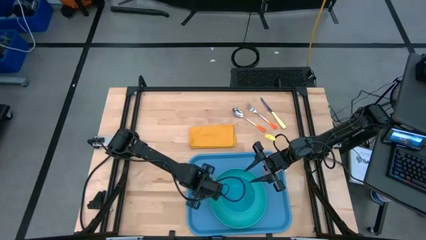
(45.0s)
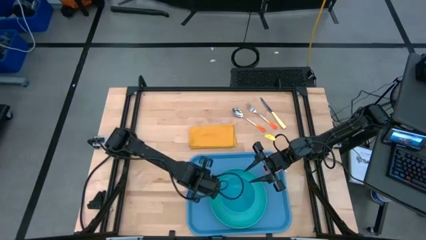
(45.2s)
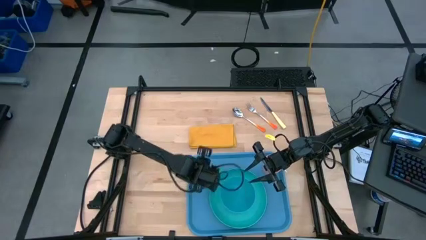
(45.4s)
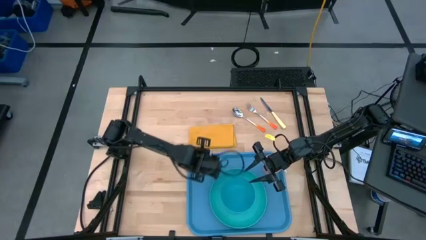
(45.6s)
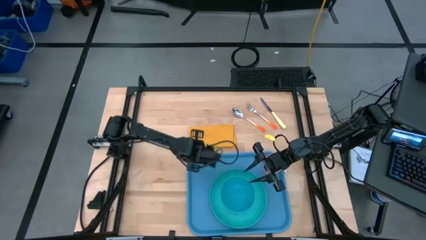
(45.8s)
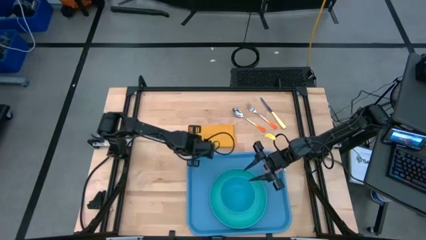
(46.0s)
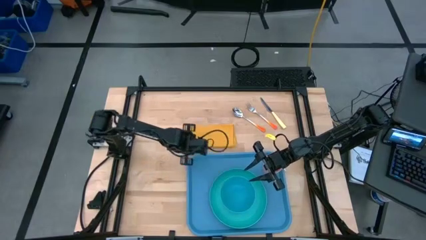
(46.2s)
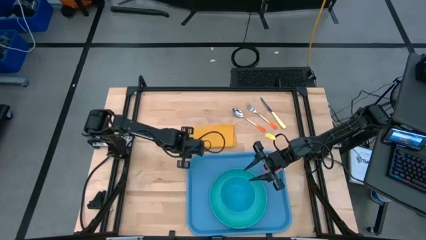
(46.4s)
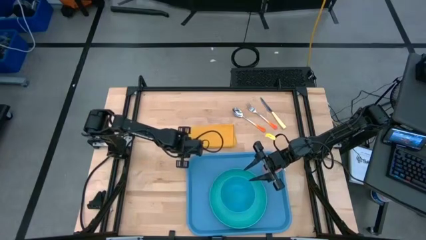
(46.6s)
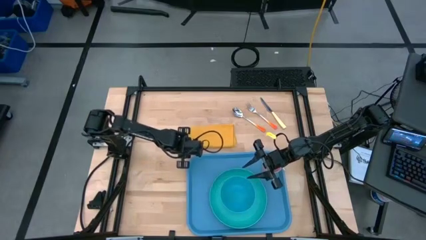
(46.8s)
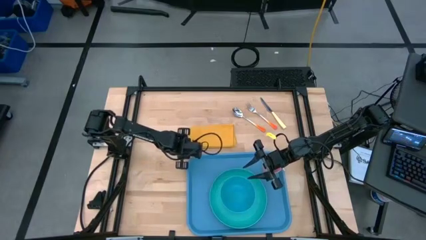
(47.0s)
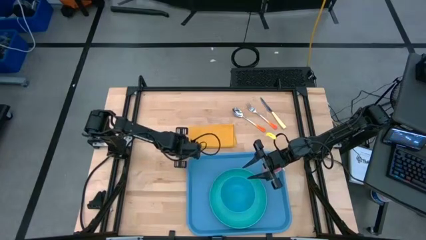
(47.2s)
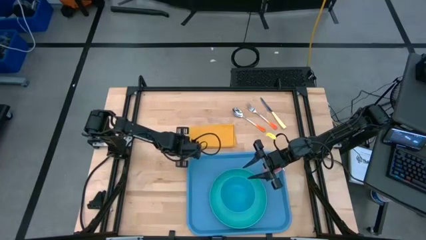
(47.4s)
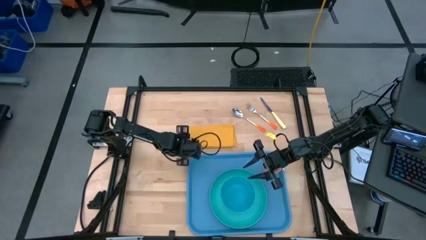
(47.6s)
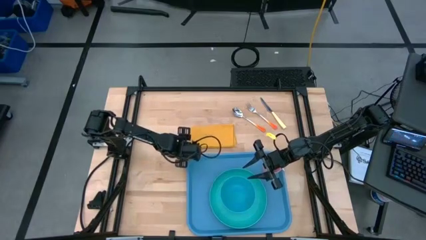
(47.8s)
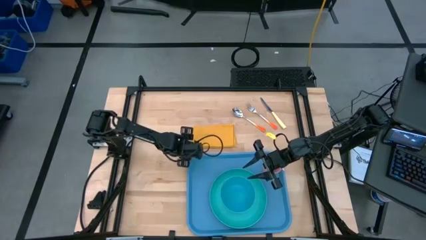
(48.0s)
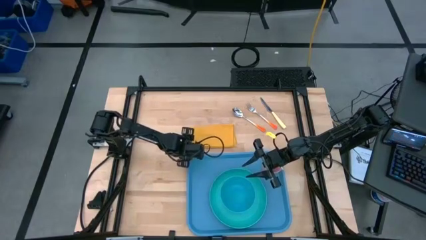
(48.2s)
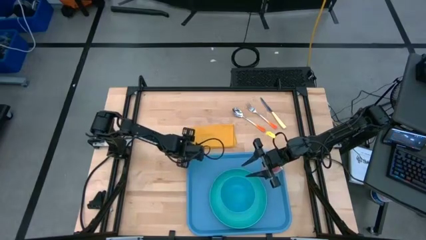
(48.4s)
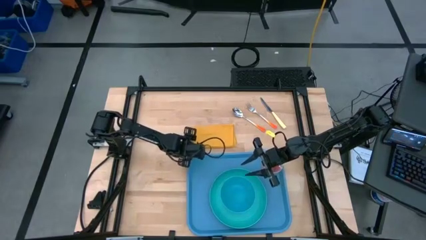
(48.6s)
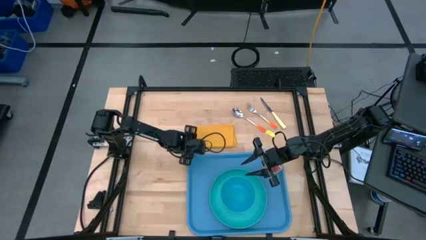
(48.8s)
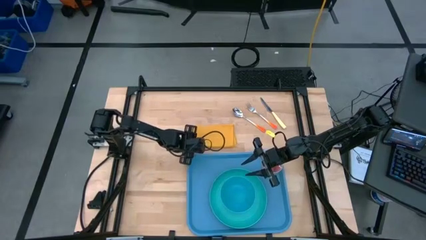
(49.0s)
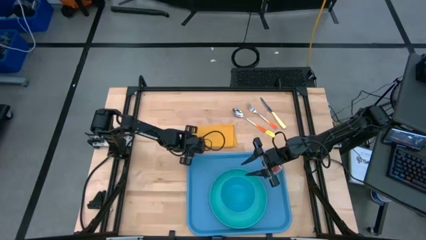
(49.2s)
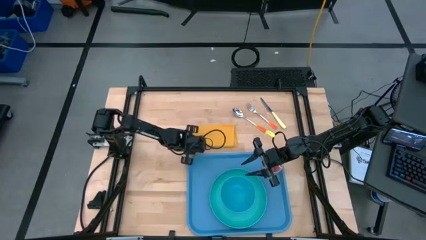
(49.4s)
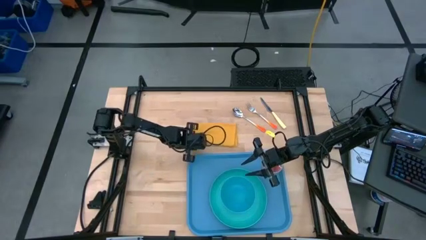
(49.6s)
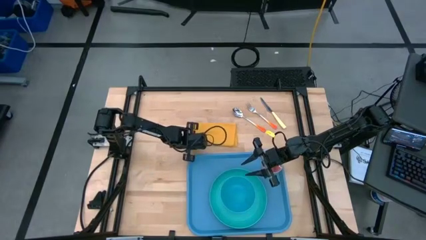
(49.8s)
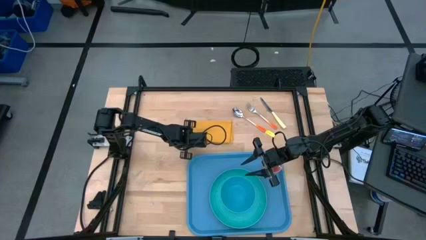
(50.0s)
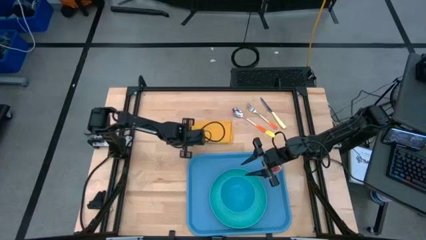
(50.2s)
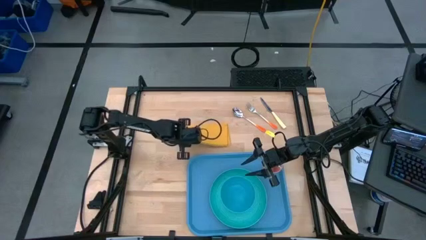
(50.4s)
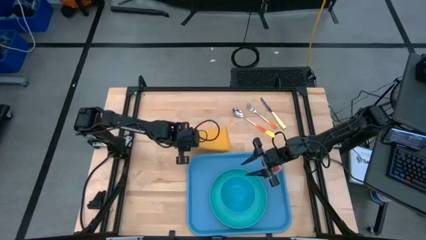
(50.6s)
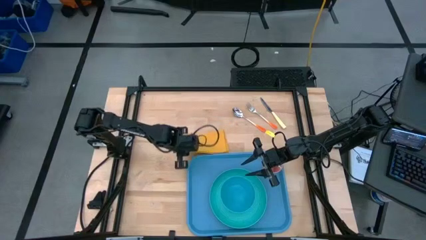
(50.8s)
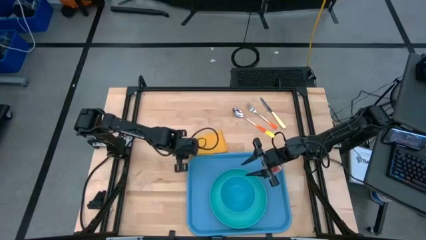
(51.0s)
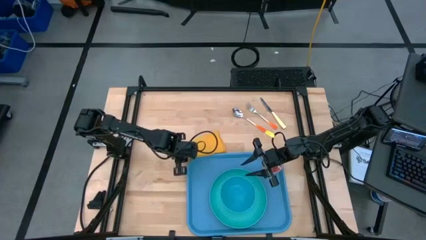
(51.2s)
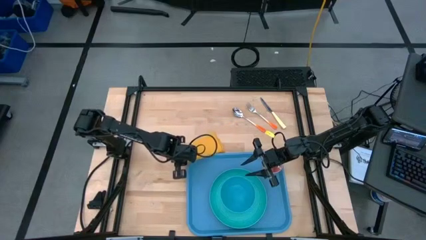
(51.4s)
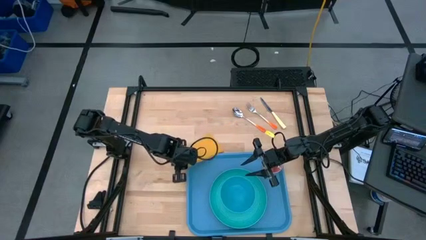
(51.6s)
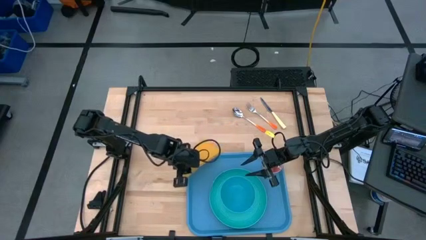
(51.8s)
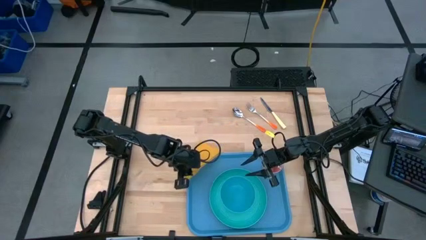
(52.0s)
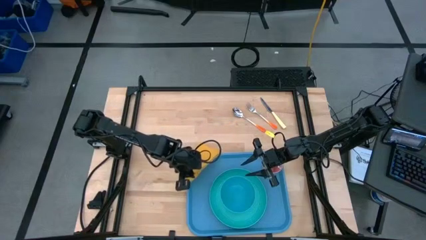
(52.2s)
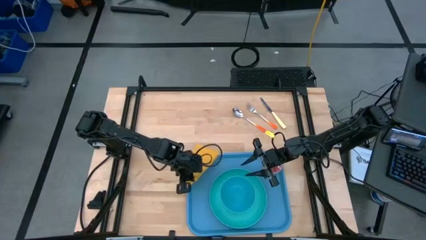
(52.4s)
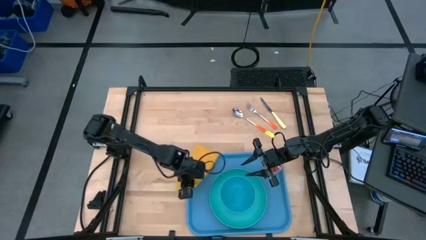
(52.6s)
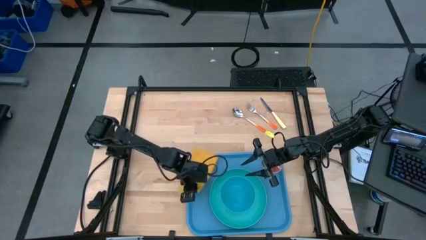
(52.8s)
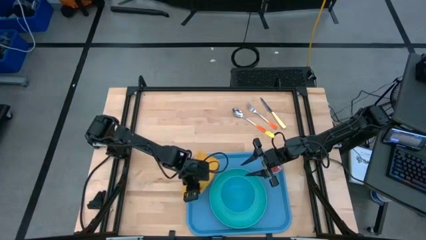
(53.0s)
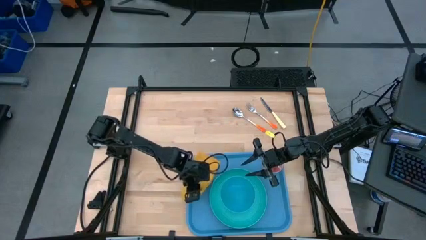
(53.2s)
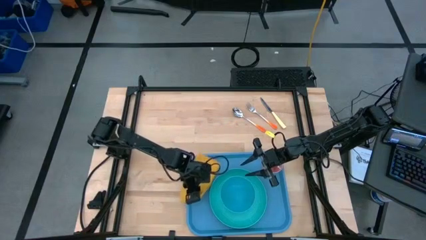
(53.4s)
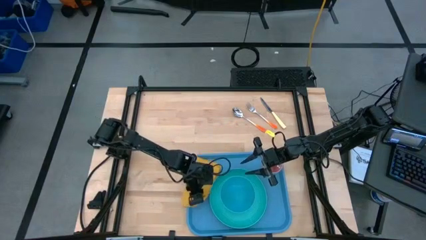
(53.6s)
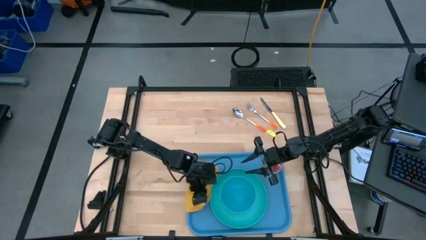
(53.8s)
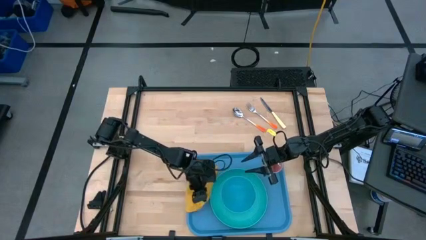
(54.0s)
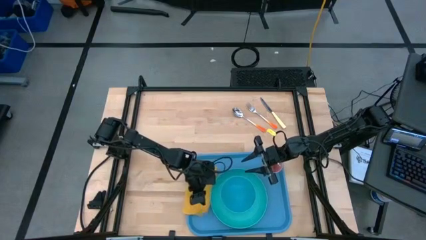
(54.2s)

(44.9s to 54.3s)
Task: Set up tray
Put the orange napkin on the blue serving tray to the left of the blue plate

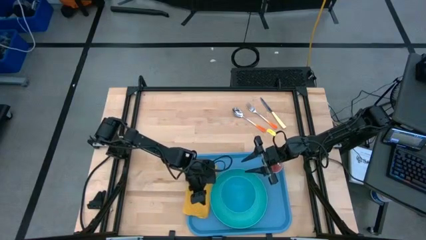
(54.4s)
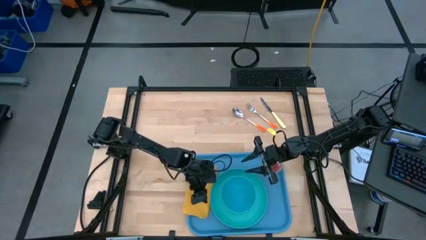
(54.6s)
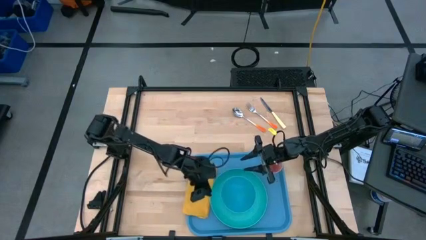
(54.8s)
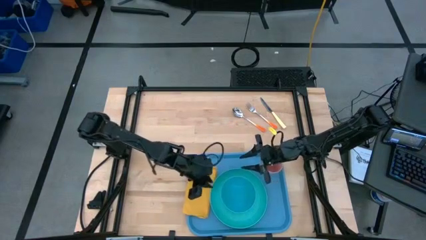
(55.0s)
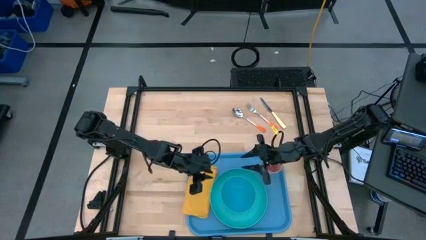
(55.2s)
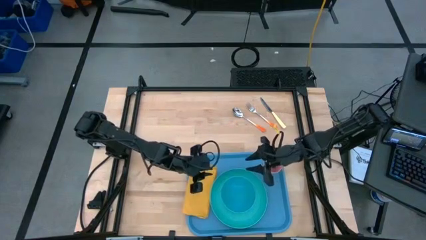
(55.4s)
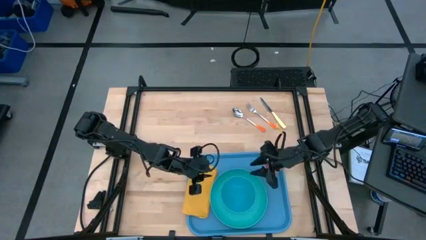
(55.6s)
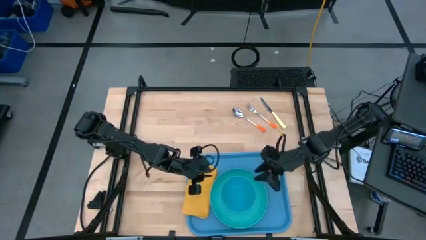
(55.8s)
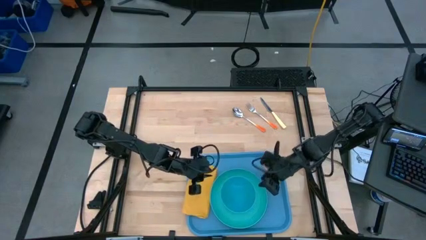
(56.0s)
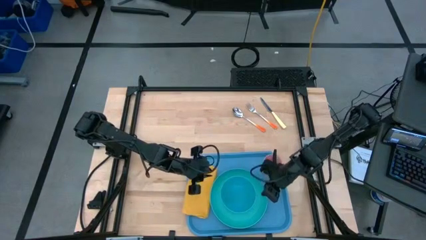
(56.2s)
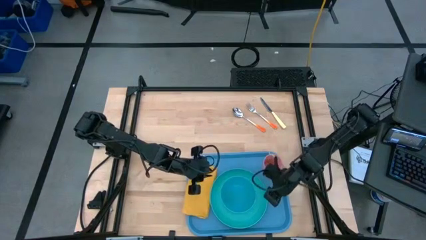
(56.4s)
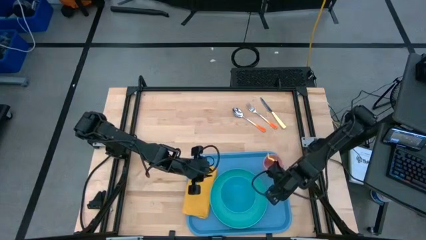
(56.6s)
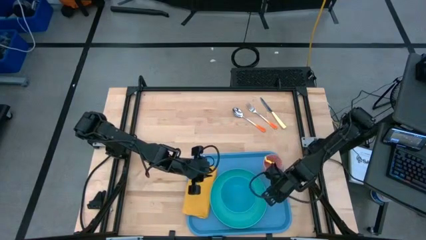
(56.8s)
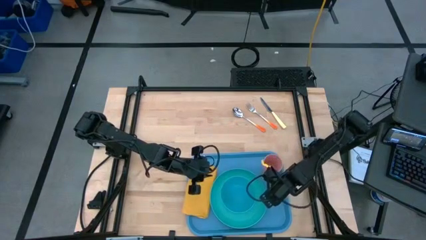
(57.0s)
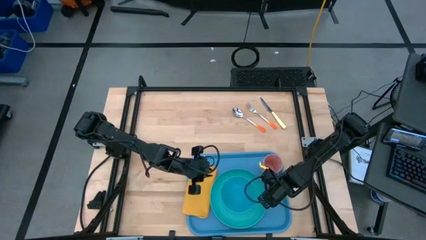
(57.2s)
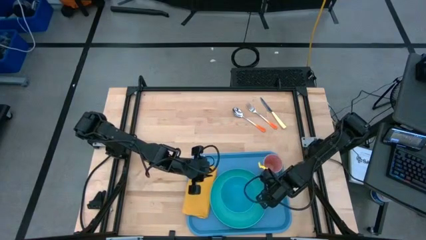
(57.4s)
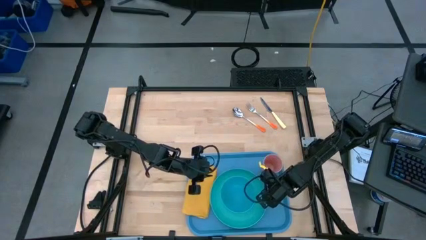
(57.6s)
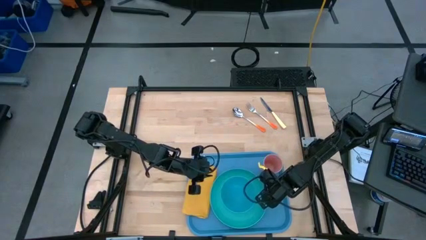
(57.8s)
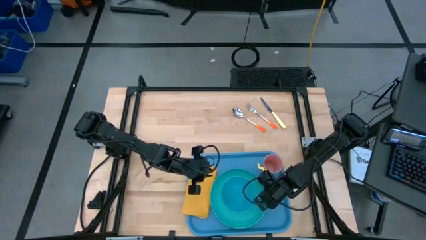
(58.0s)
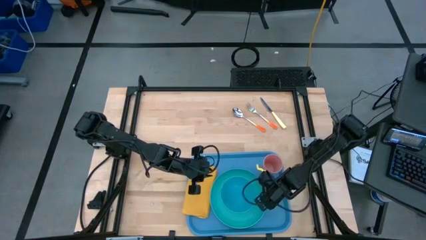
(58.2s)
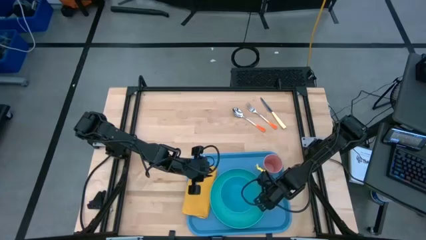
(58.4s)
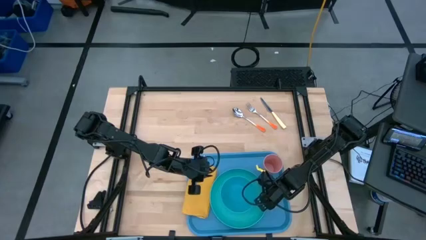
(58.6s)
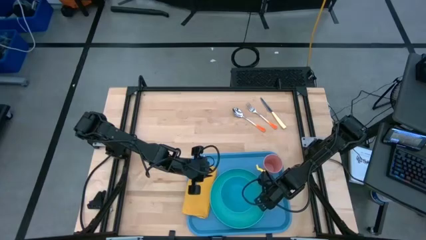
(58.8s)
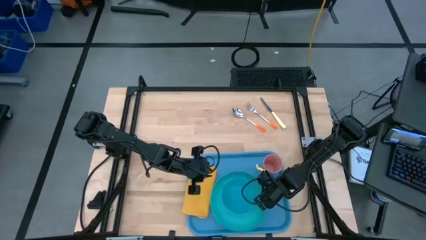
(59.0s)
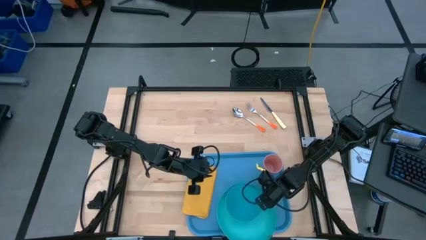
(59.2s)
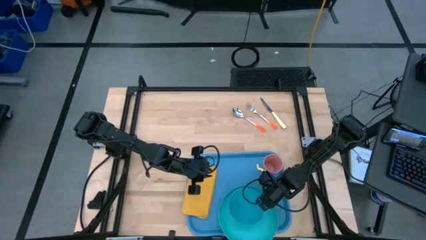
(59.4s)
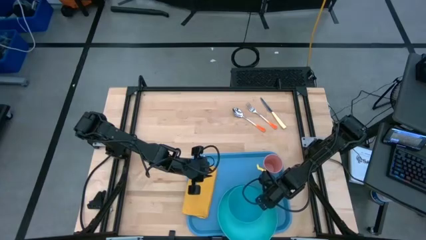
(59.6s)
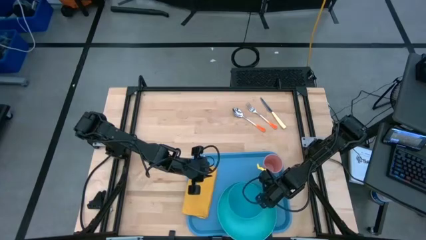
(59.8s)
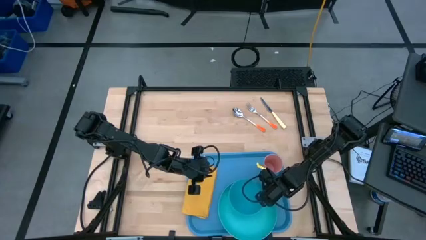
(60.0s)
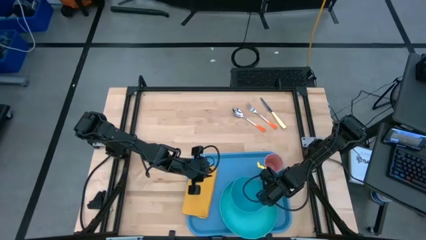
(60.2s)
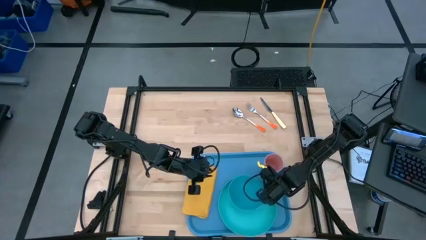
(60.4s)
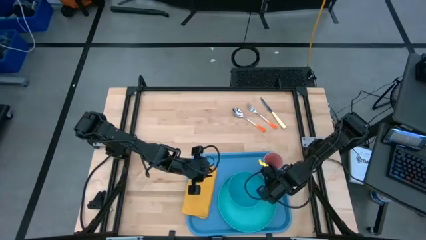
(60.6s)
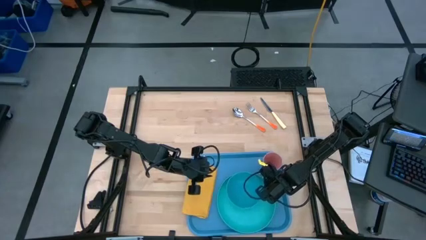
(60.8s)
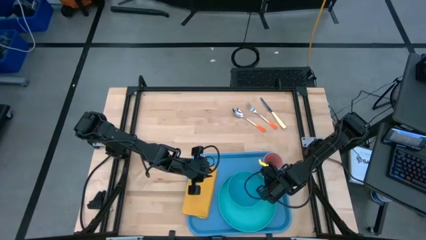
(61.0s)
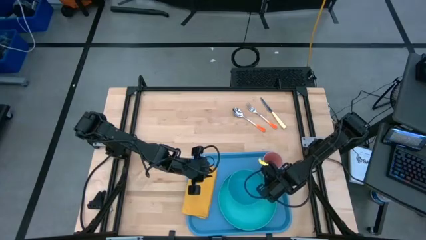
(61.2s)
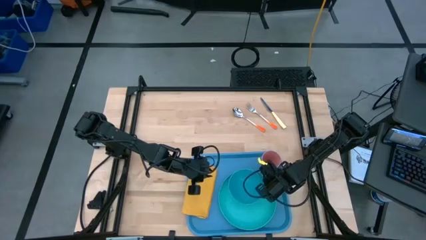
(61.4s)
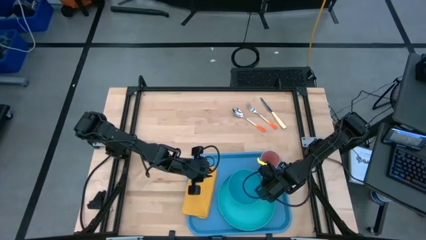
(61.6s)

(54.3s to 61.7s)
Adjust the blue plate on the blue serving tray
